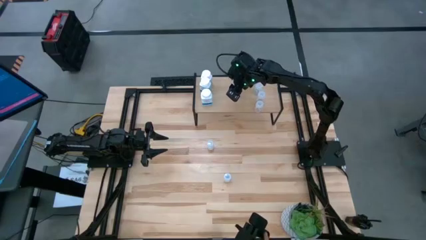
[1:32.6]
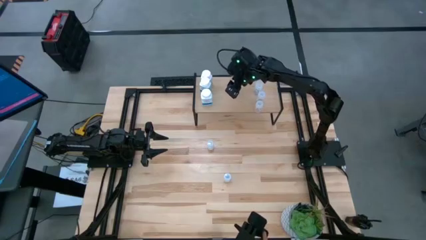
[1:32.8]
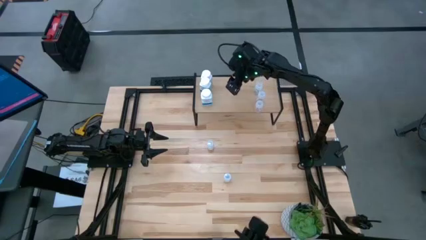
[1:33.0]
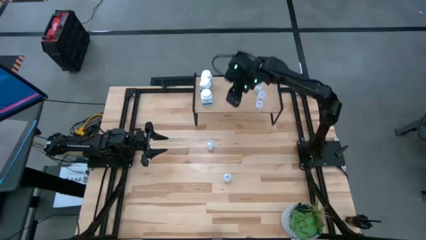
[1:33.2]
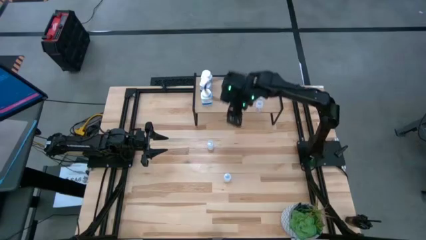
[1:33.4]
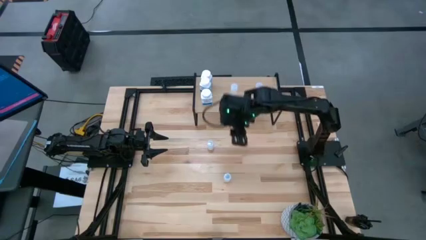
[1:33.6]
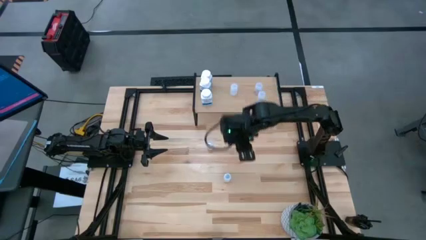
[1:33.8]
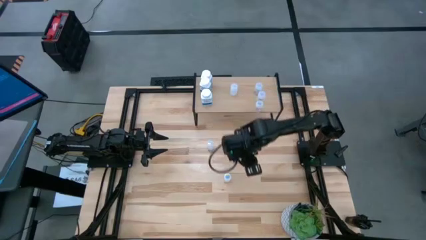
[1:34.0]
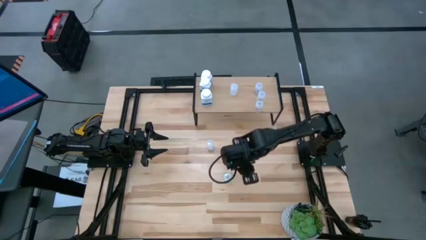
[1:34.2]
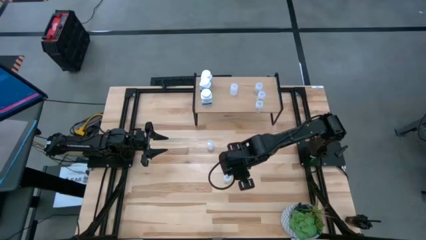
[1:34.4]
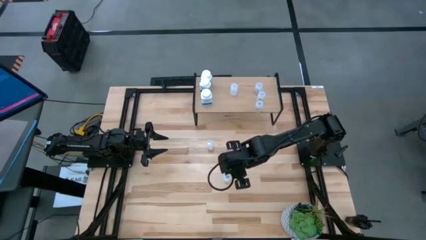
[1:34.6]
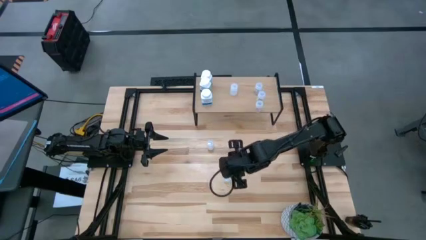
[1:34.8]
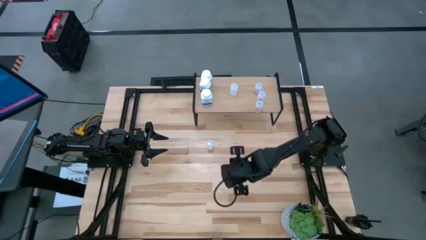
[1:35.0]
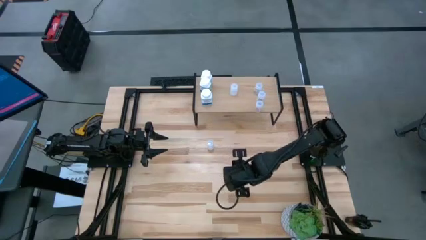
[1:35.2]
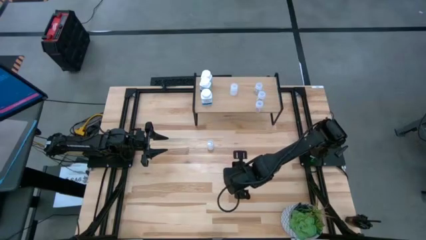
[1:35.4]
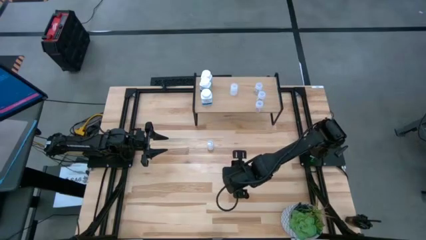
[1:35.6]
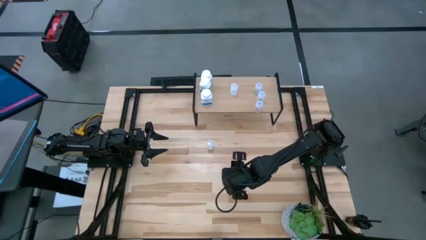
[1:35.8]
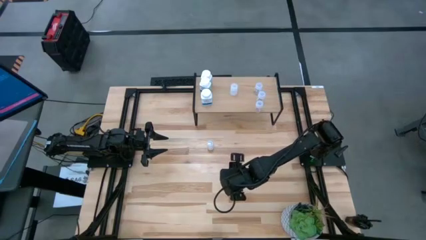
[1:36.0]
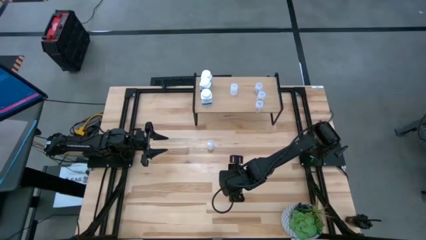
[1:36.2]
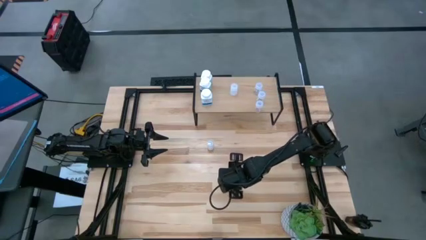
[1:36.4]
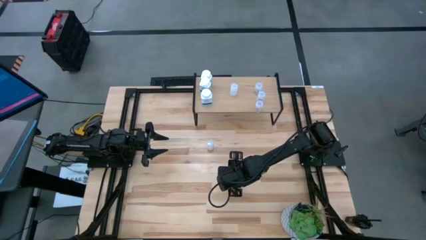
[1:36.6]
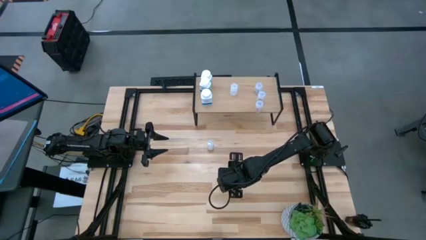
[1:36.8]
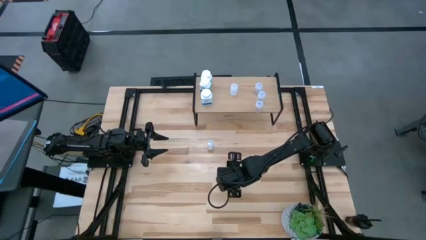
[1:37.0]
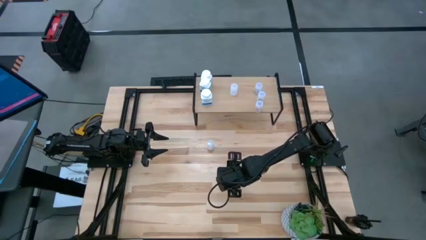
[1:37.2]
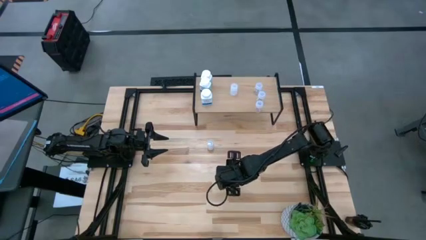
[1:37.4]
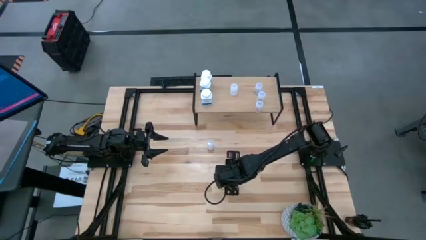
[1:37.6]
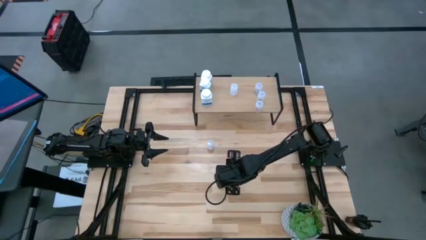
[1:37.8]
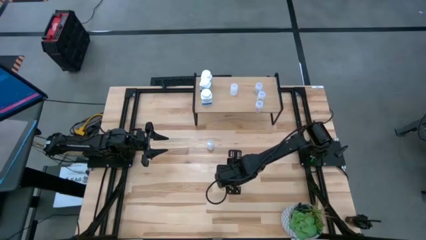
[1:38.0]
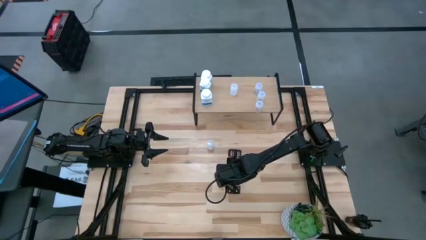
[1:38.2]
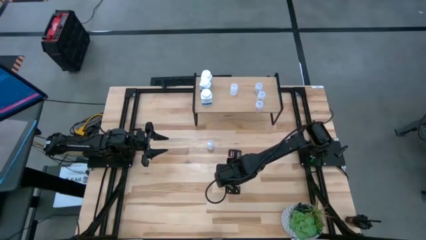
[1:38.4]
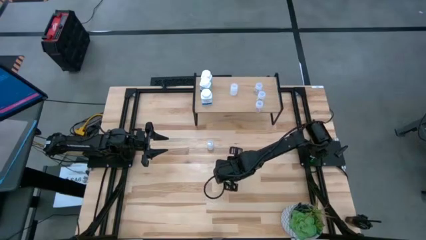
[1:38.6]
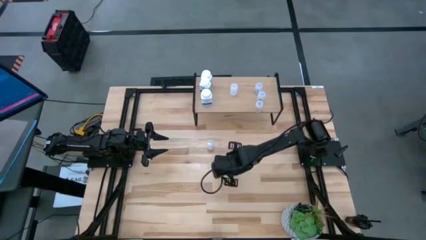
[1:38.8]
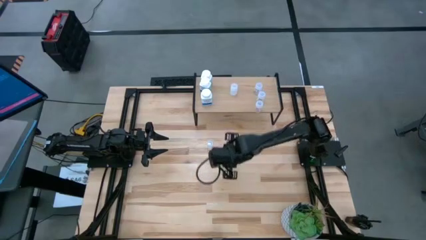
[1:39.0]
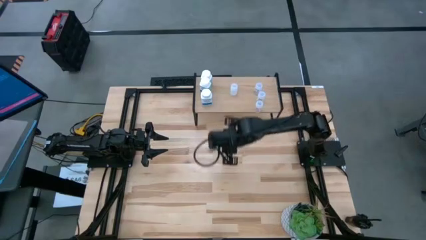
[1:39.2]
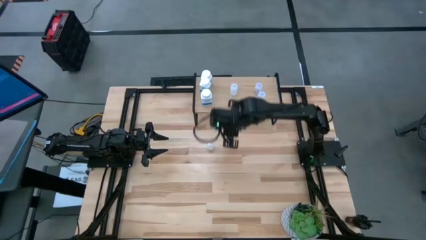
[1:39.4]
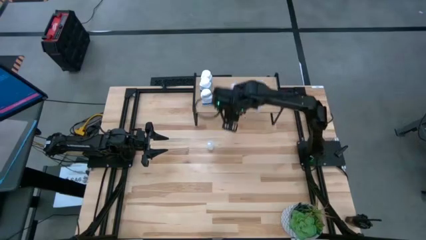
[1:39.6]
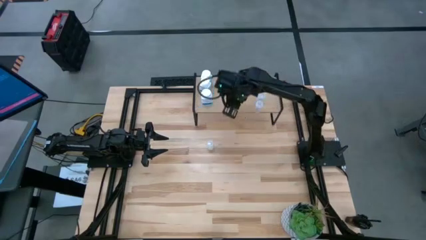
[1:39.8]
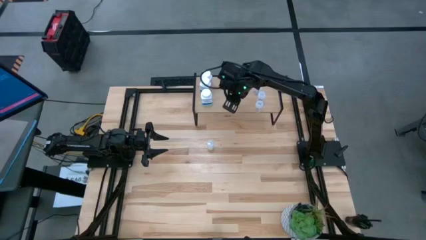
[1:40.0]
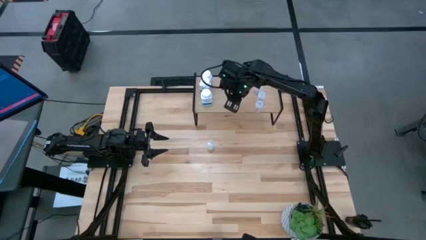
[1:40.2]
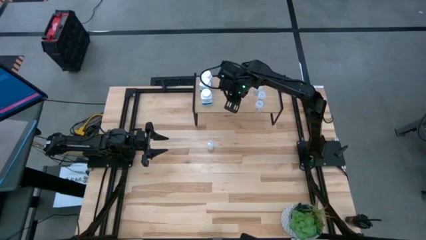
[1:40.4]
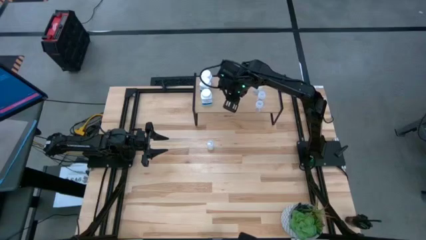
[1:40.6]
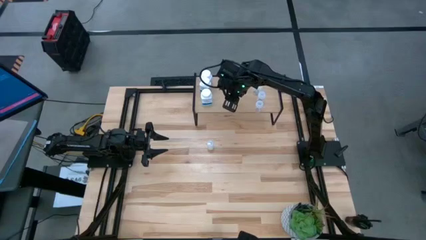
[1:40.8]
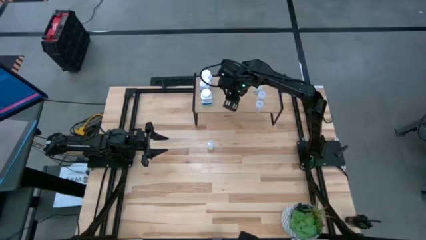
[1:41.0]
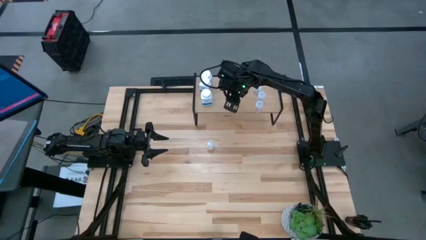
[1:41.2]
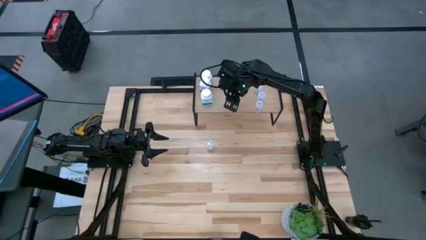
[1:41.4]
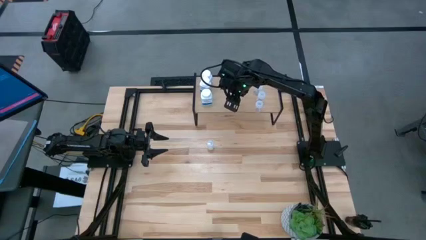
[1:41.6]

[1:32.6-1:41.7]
Task: Pick and place medicine bottles onto shelf by color
Put the bottom white pill bottle on the shelf aligned with the other white pill bottle

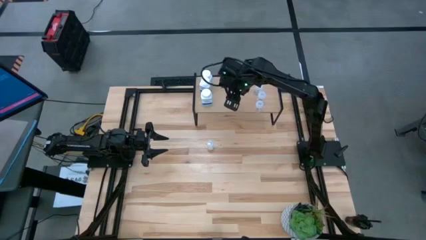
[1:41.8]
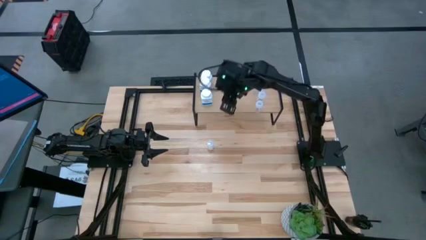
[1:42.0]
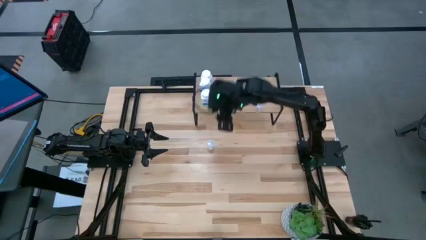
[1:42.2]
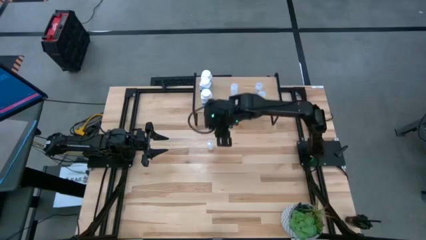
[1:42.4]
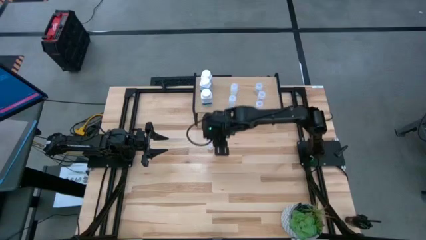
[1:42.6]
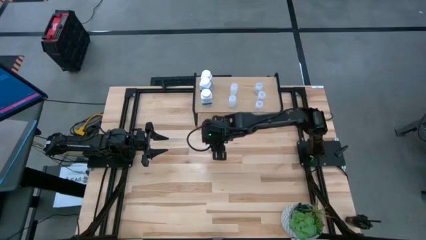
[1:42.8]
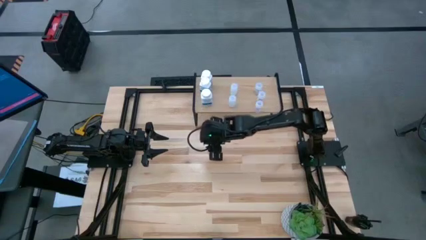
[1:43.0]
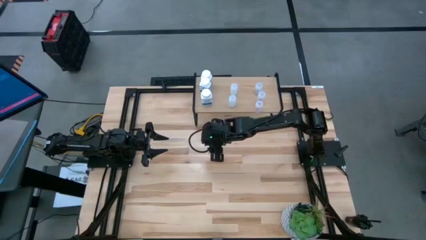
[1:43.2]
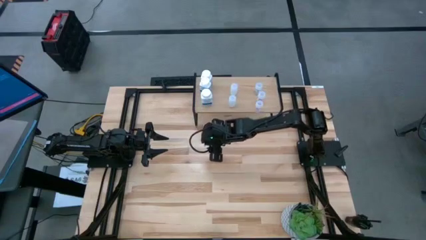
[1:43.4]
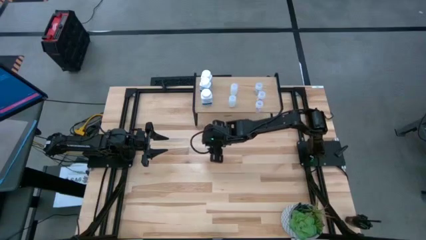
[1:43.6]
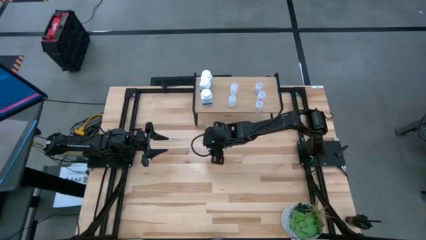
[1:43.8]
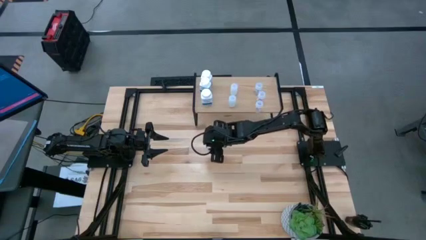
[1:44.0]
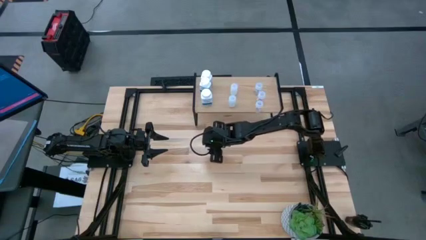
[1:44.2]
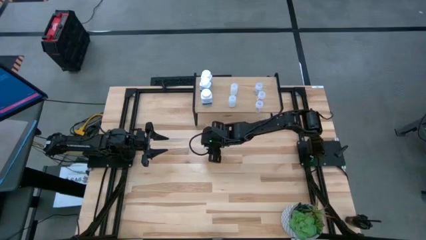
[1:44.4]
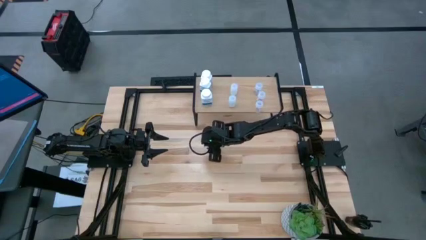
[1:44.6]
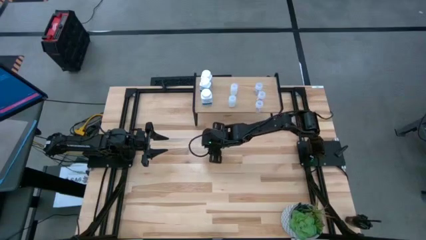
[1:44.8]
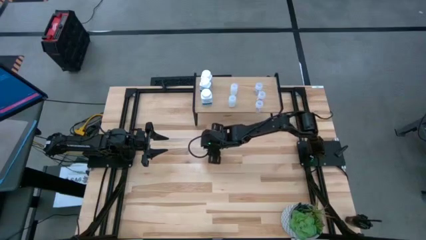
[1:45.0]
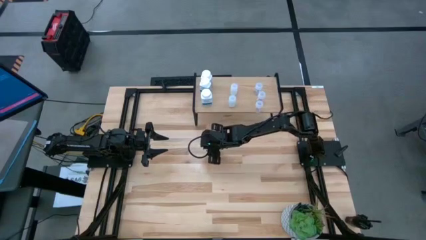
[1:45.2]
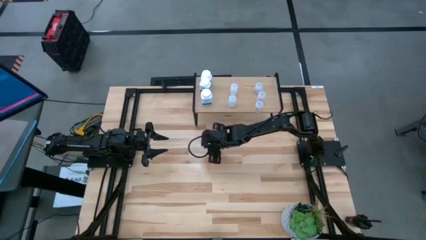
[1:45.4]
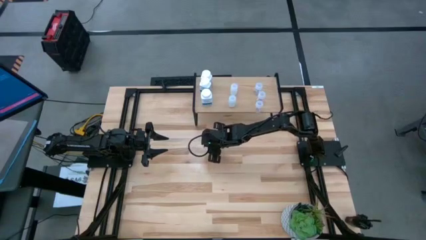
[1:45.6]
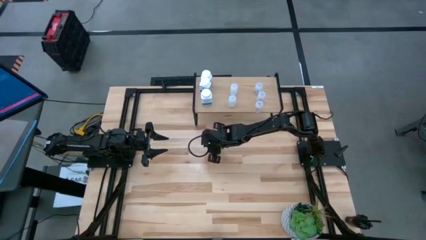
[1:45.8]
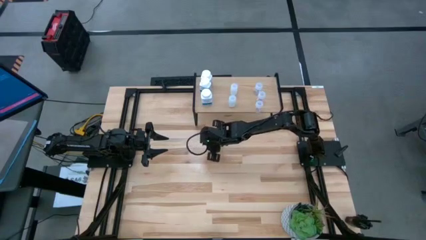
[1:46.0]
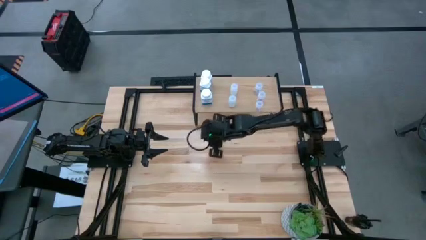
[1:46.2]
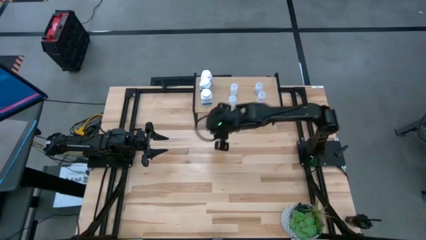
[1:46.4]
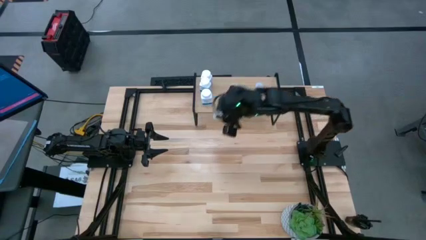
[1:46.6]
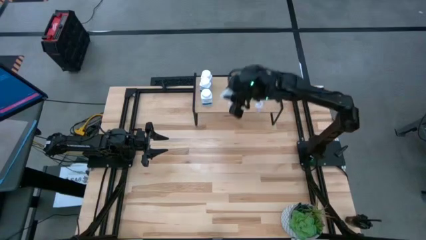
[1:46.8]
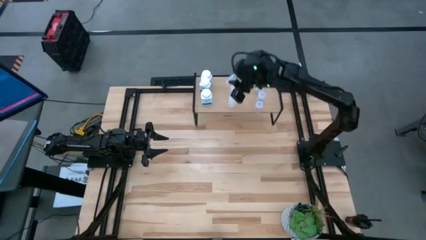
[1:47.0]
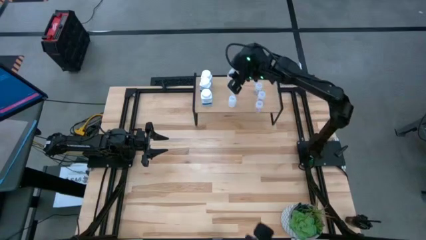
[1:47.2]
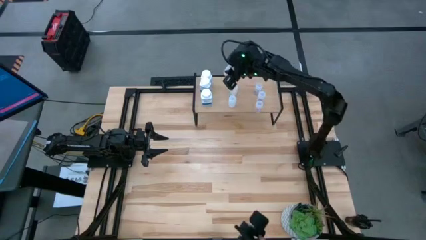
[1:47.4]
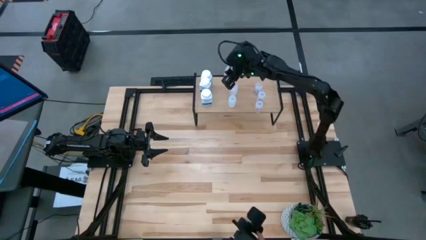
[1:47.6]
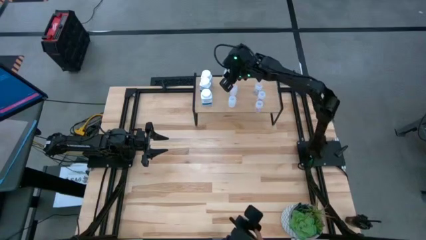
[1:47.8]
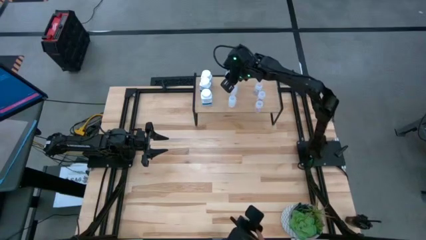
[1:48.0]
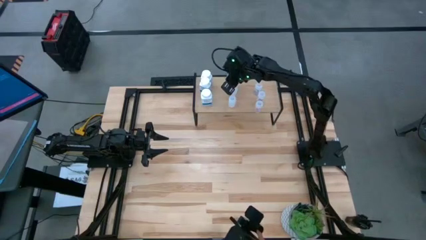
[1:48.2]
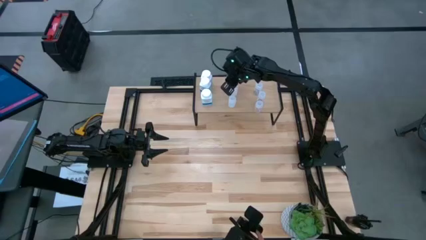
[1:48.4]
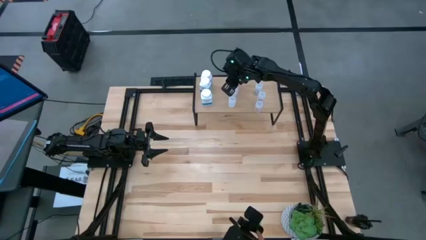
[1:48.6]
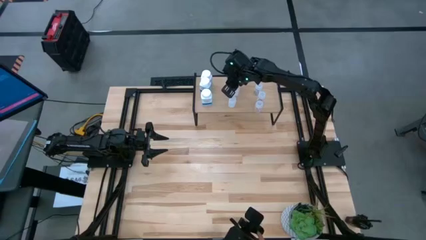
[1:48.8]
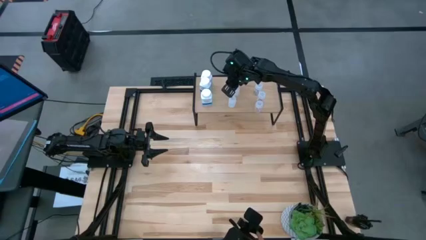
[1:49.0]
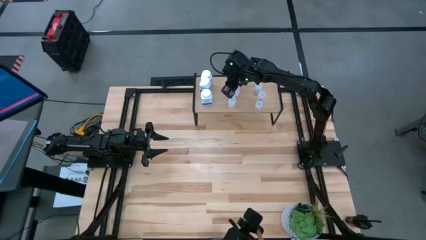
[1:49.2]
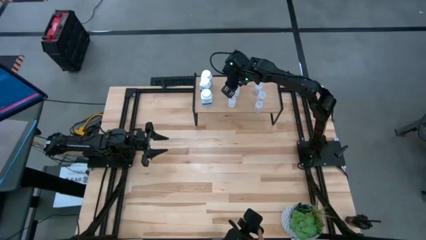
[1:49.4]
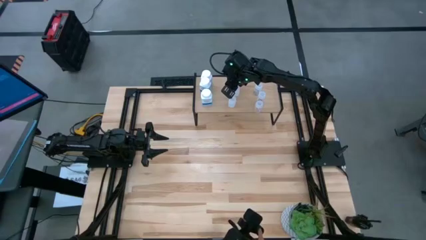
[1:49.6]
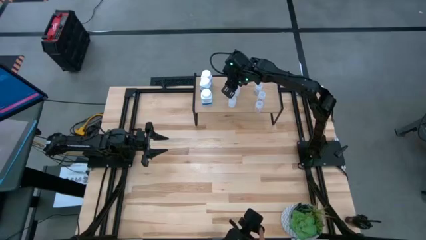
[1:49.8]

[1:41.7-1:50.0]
Put the white pill bottle on the shelf aligned with the other white pill bottles
